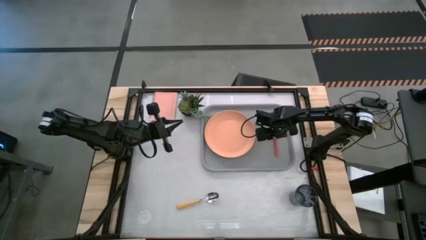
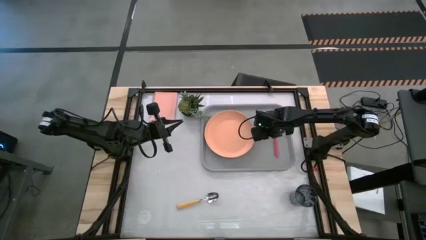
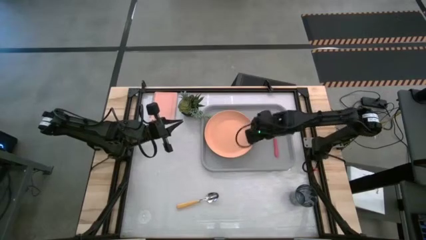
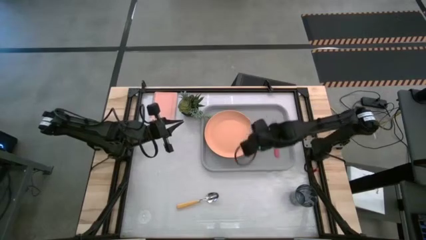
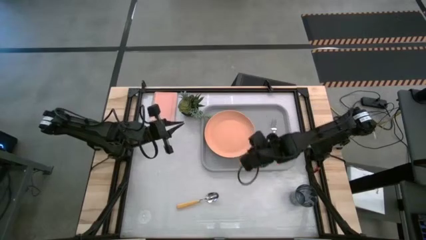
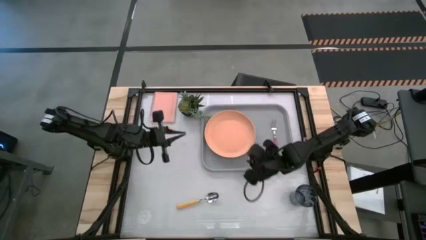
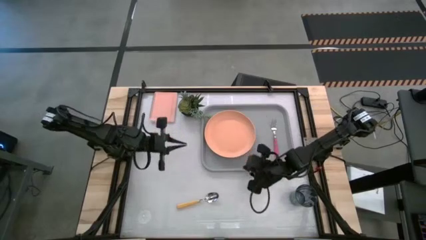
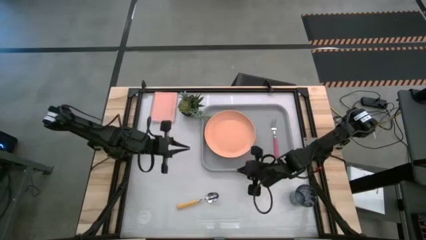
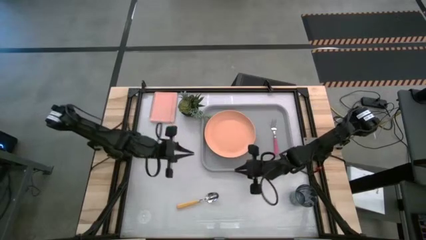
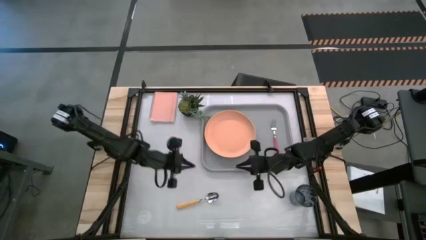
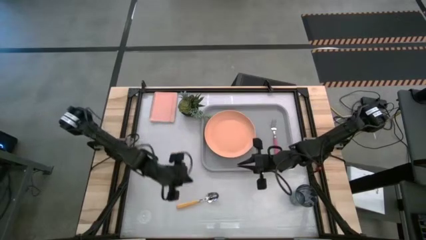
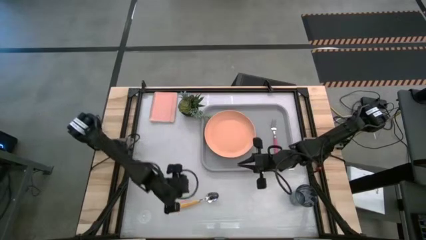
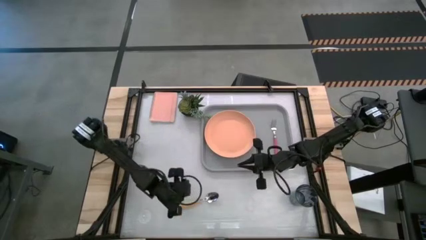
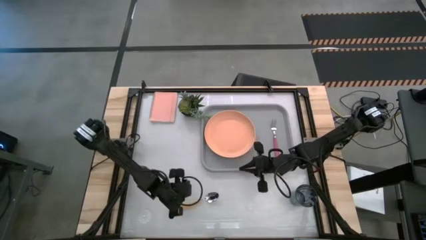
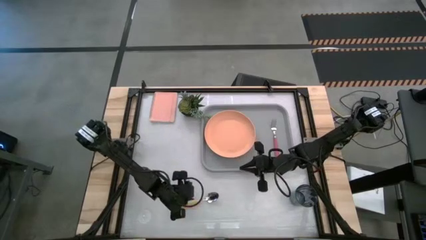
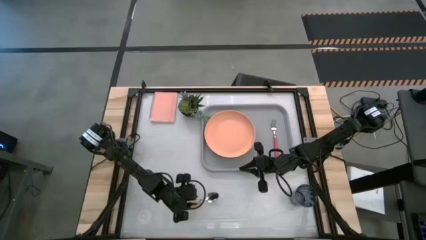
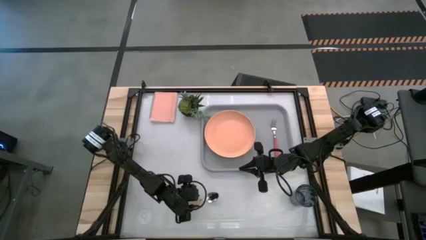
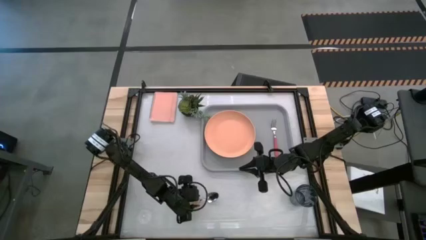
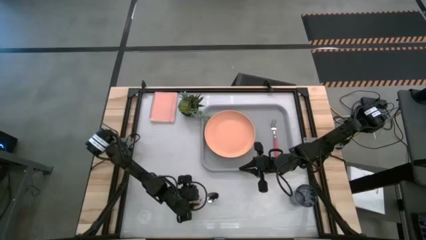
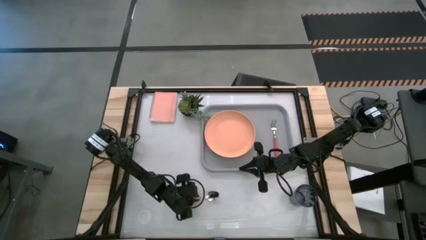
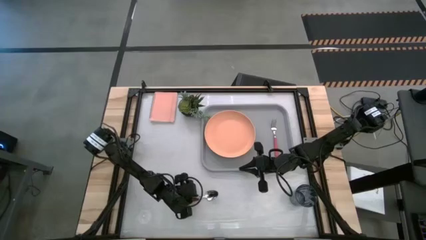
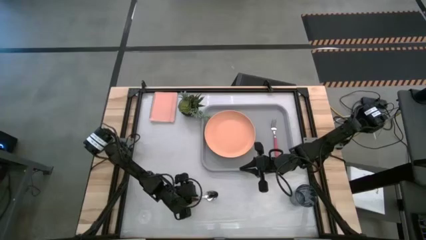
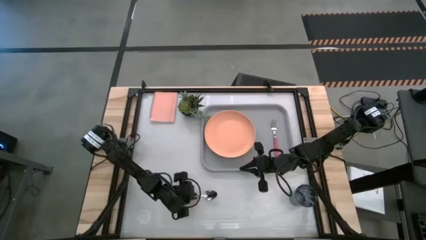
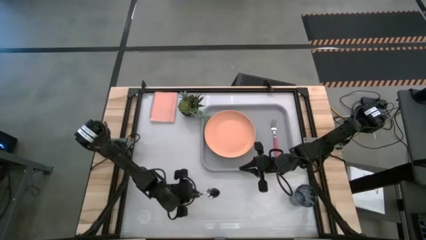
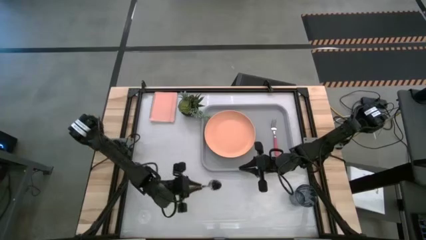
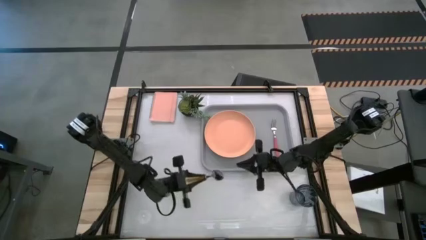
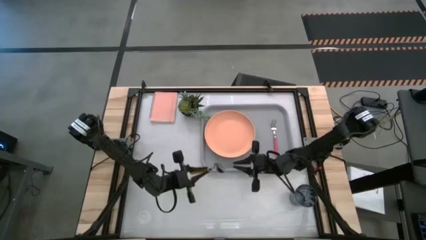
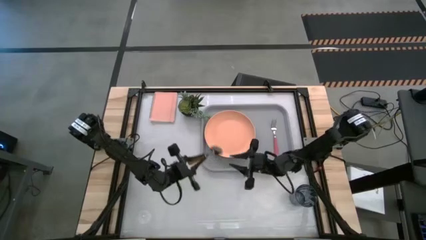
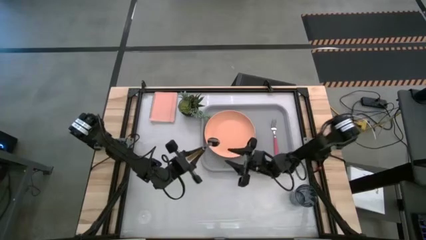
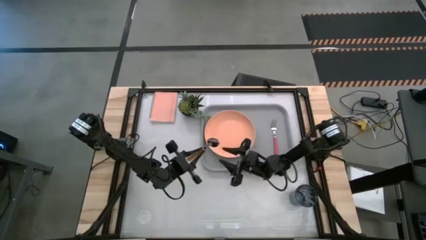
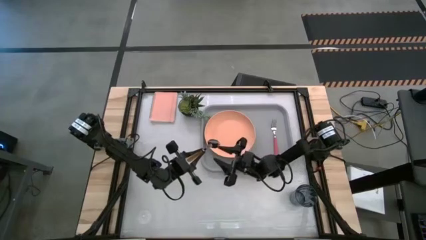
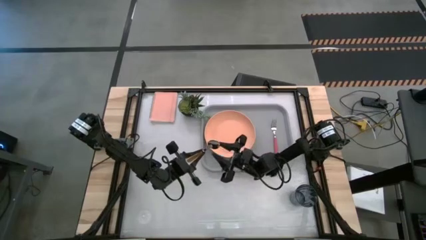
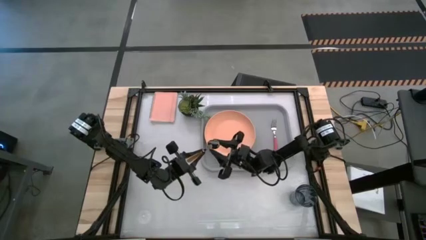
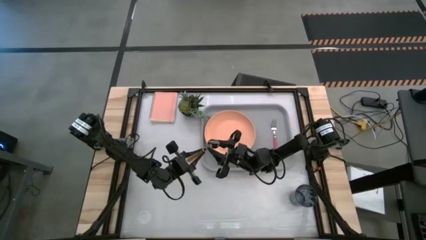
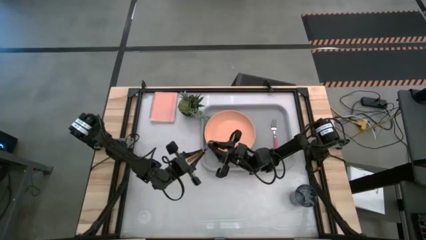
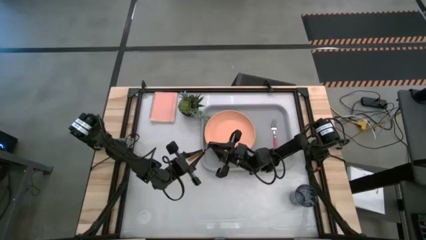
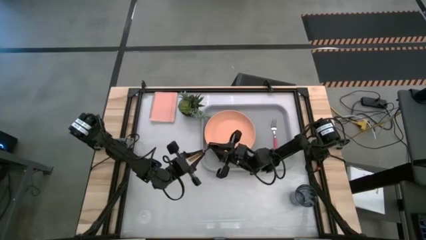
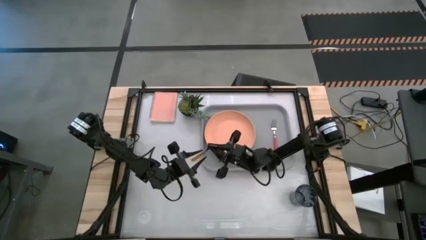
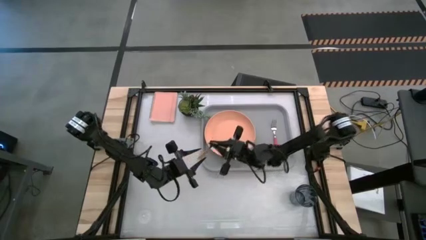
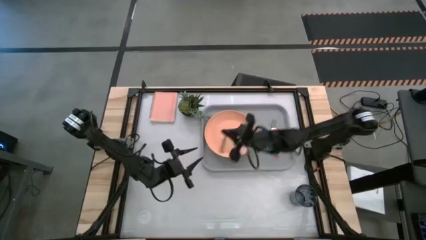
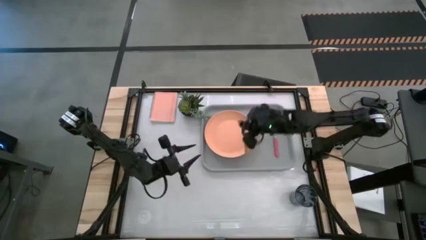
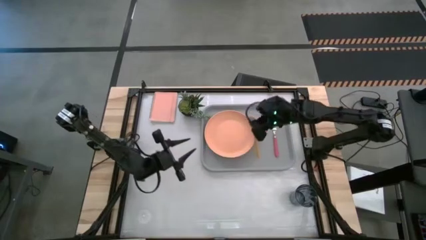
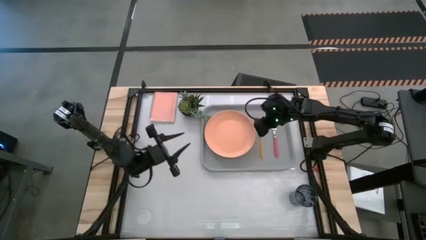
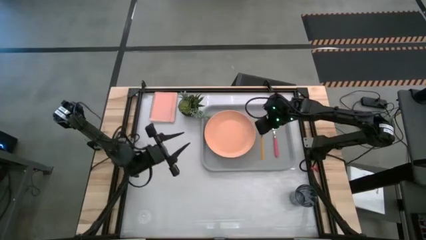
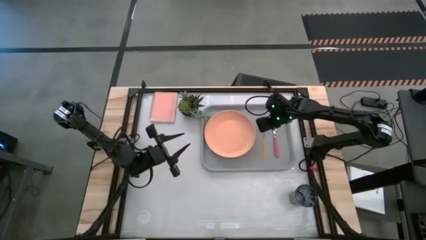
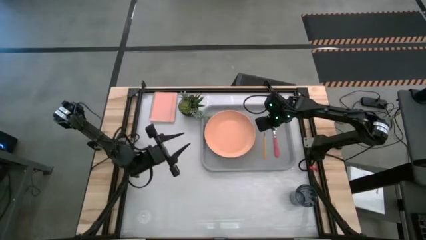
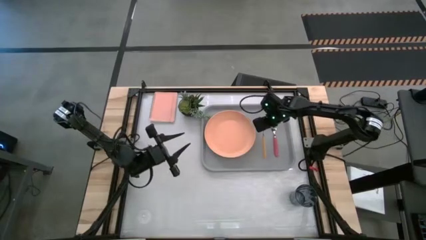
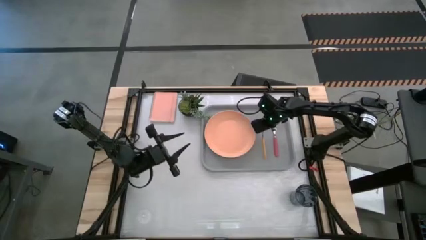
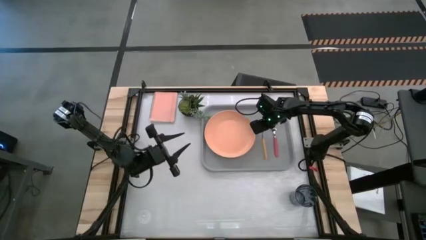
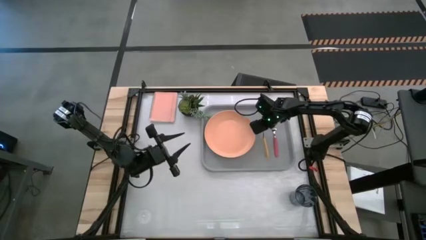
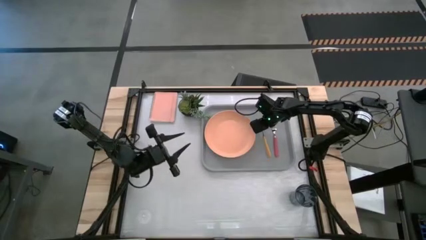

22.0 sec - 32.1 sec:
Task: Pick and place plate/cup/fork/spoon on tray
Put the orange spoon on the gray tray

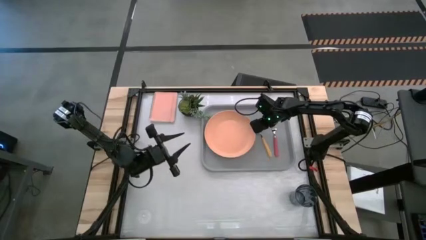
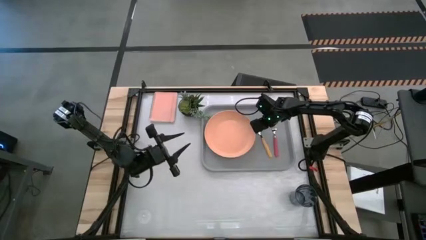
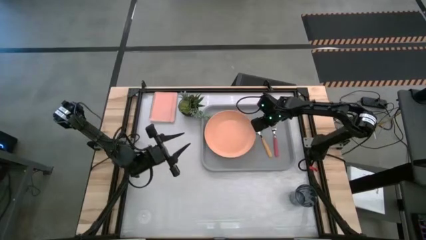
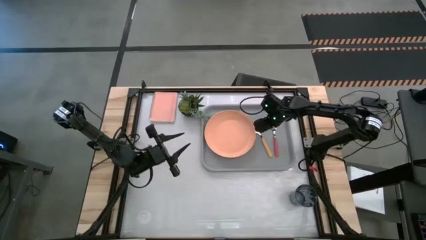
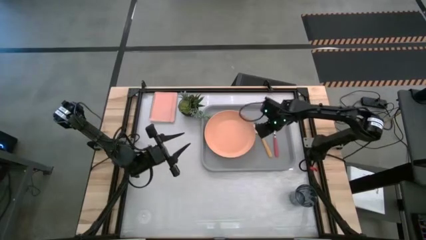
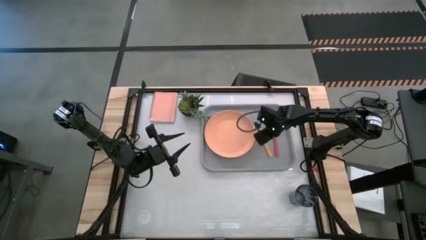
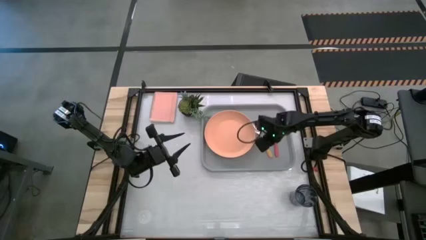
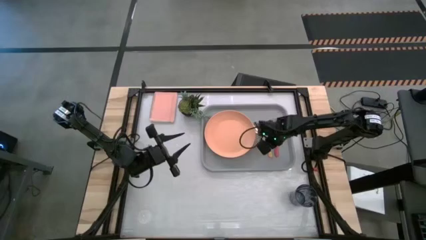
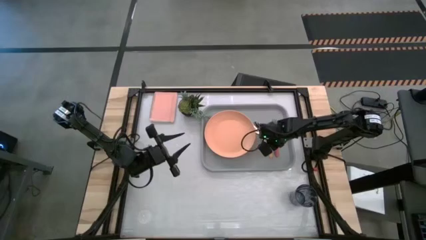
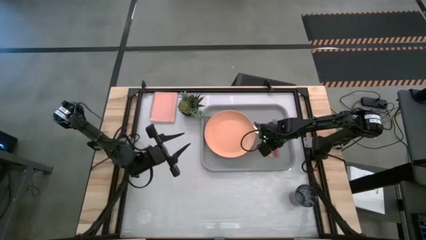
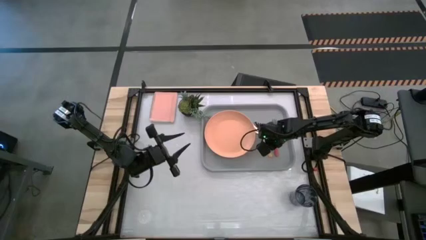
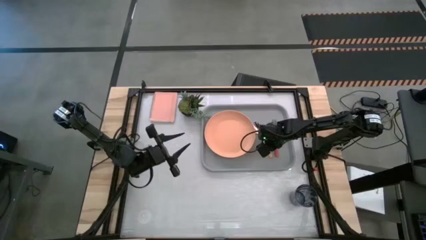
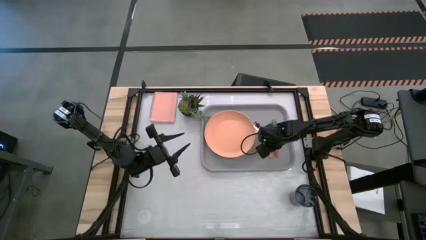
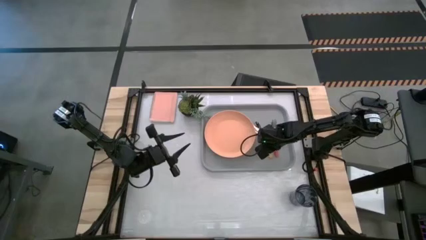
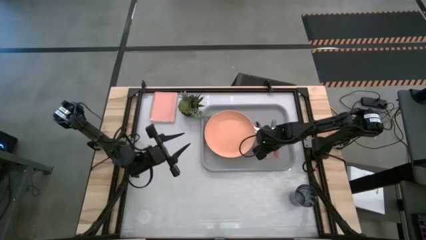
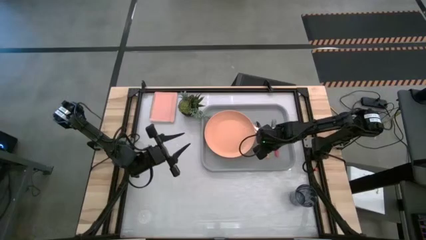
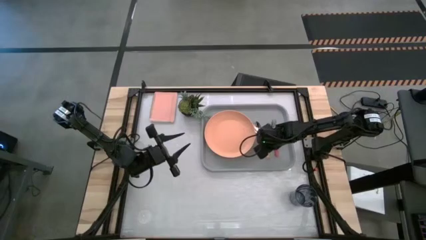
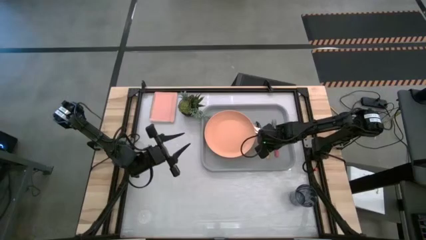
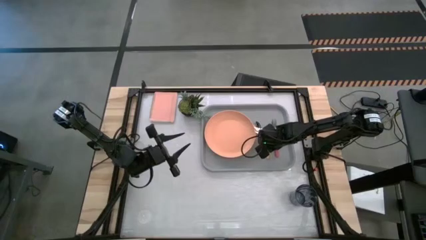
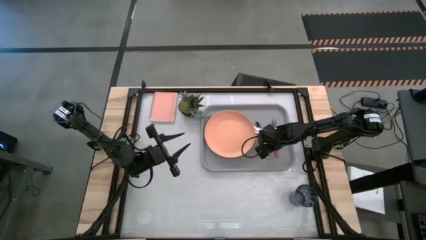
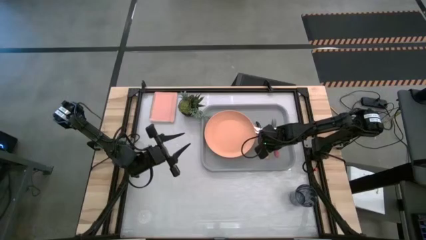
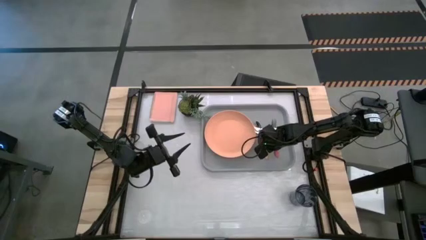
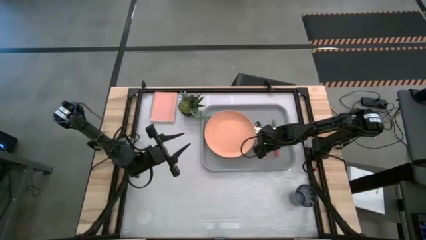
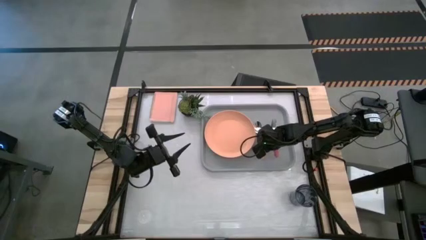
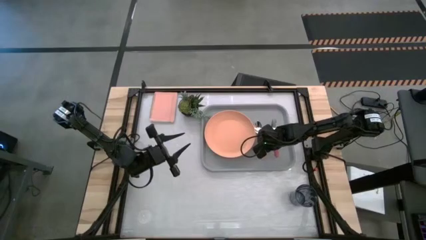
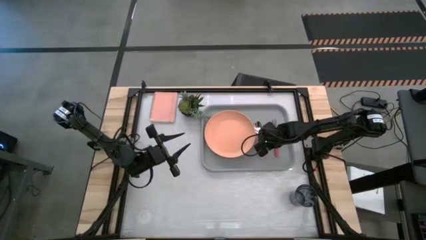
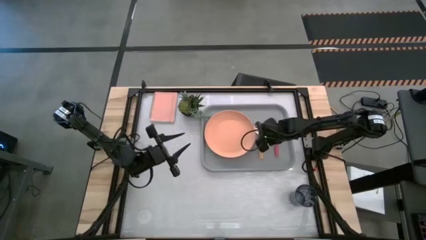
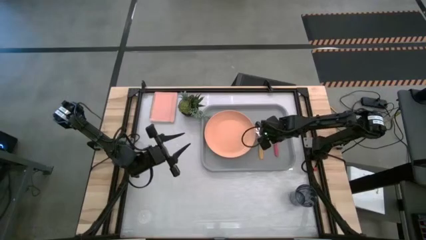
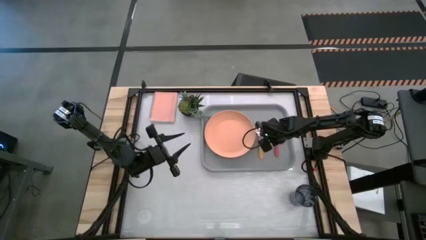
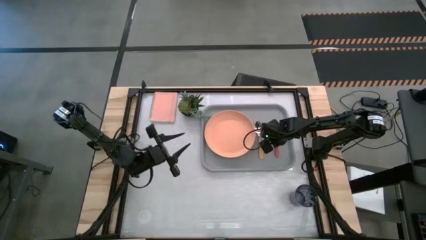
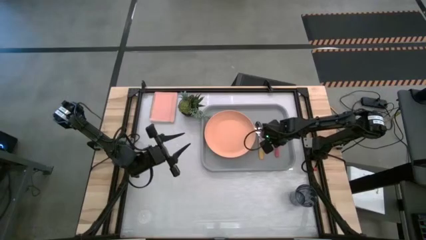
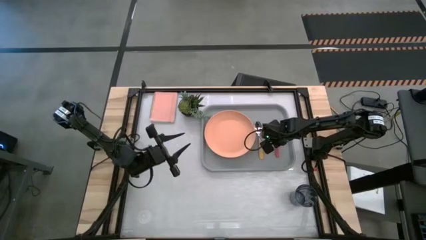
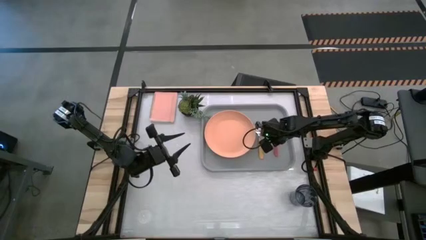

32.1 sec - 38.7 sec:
Adjust the spoon and fork
